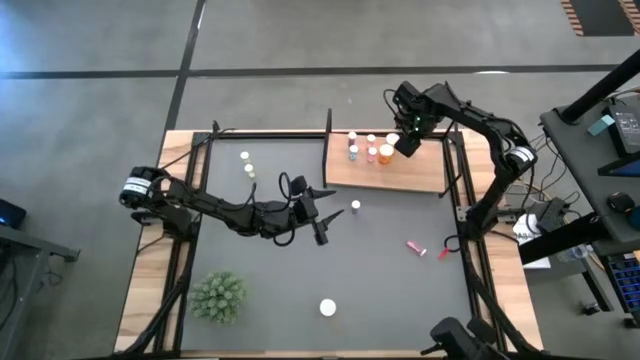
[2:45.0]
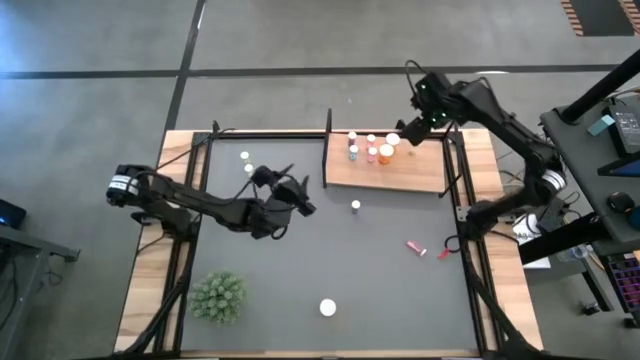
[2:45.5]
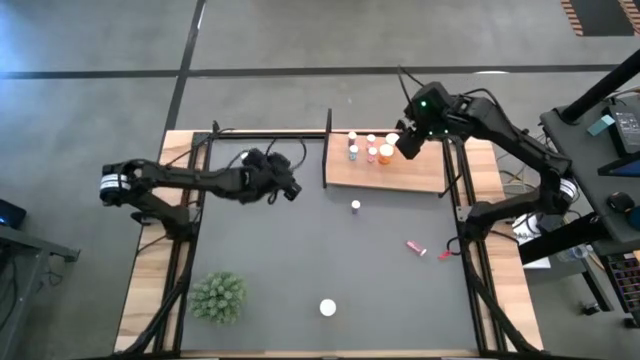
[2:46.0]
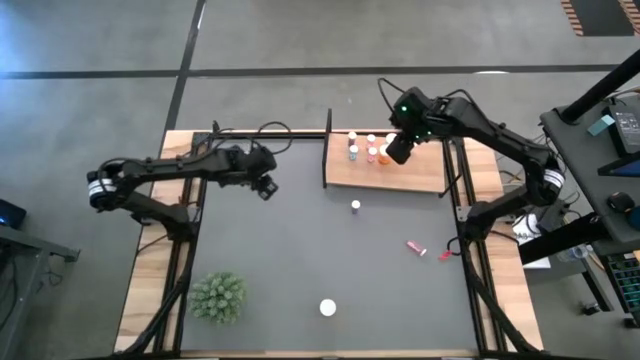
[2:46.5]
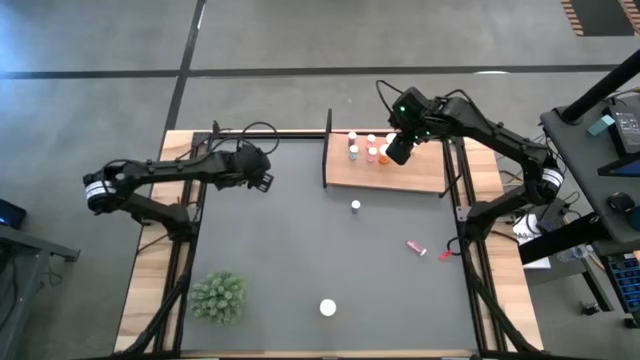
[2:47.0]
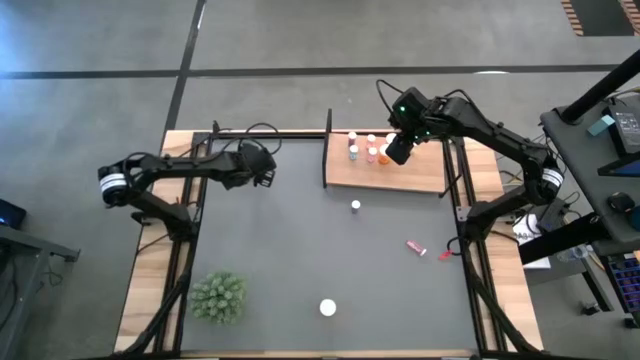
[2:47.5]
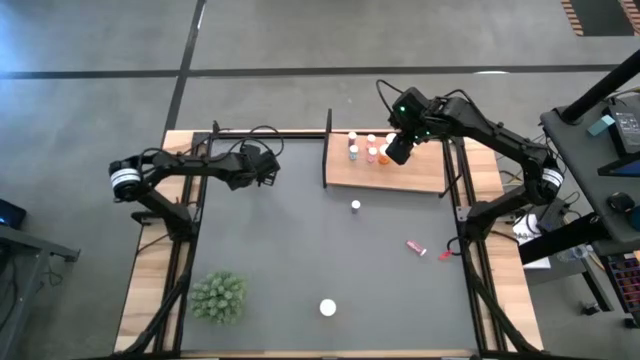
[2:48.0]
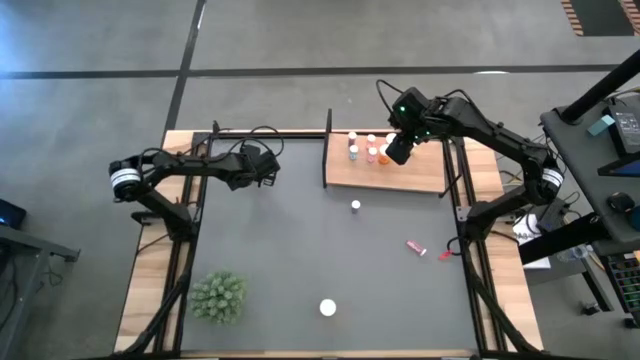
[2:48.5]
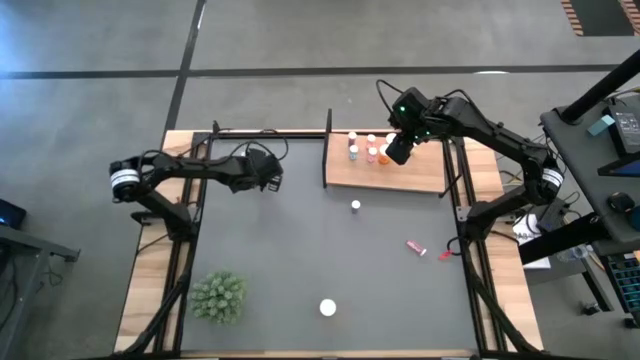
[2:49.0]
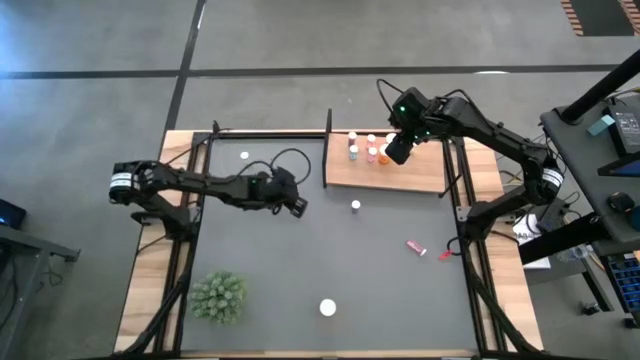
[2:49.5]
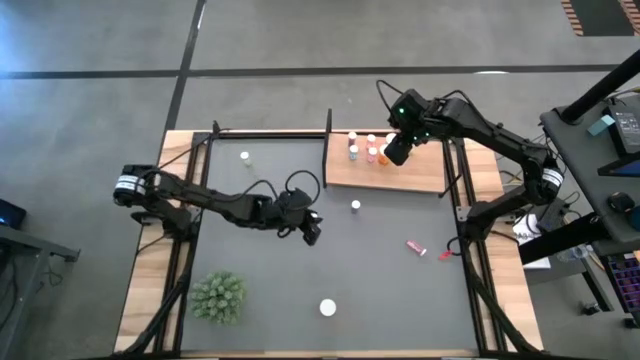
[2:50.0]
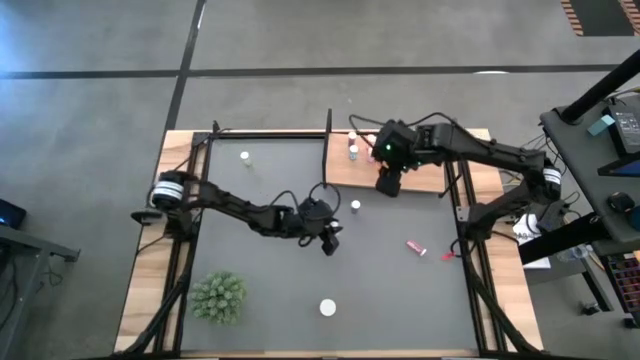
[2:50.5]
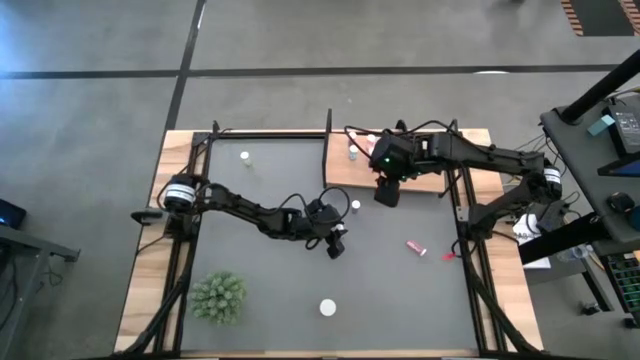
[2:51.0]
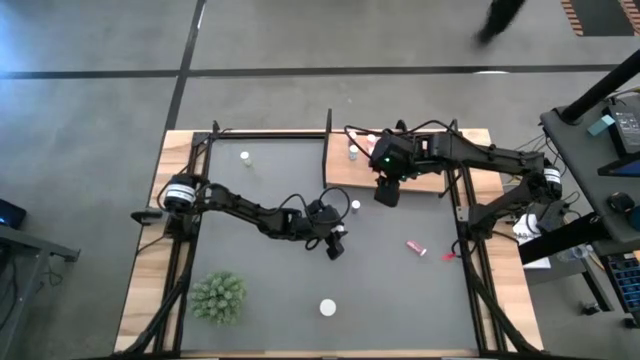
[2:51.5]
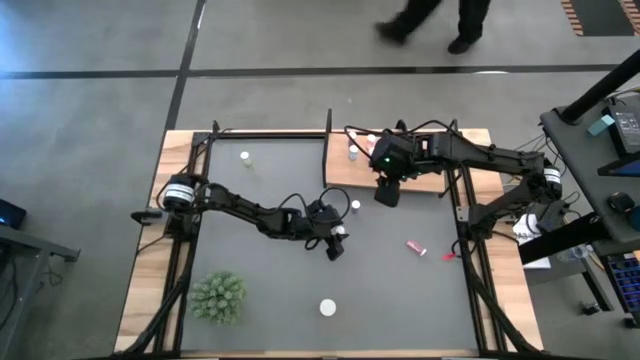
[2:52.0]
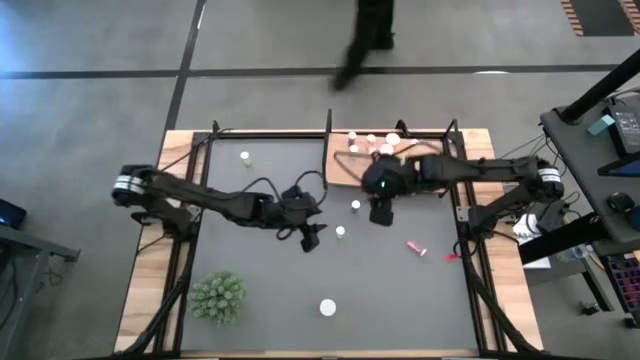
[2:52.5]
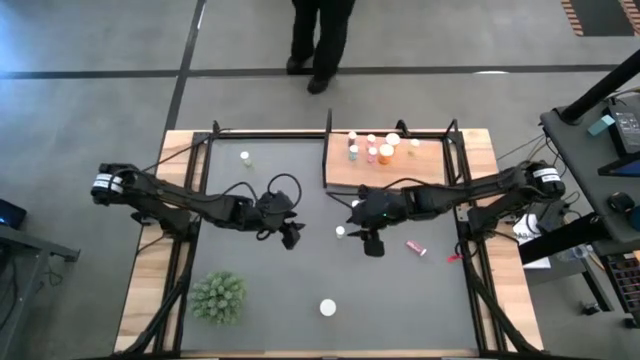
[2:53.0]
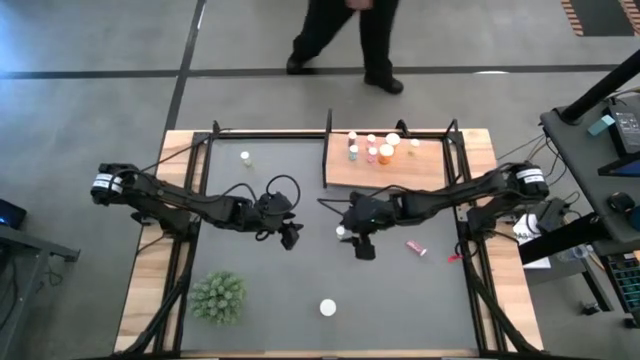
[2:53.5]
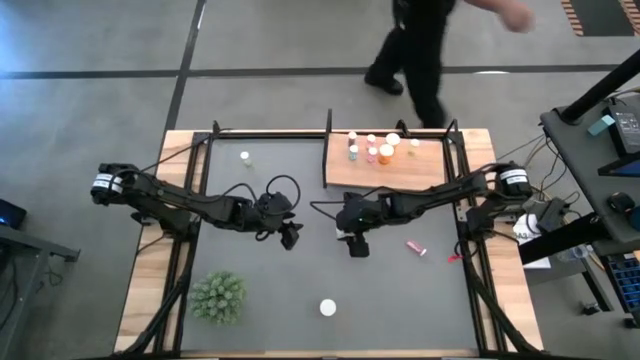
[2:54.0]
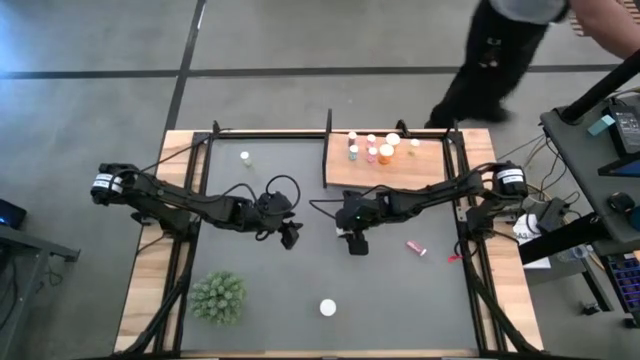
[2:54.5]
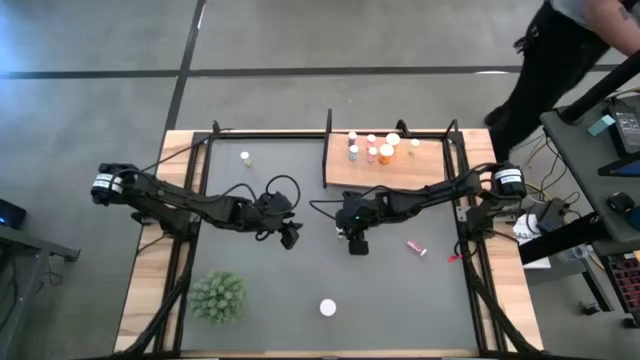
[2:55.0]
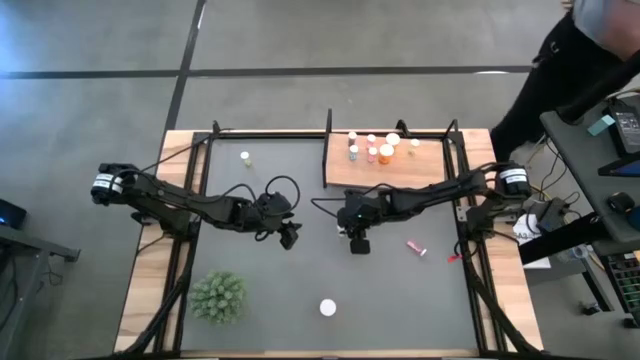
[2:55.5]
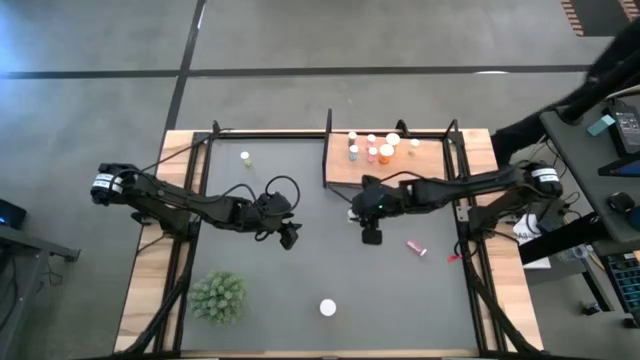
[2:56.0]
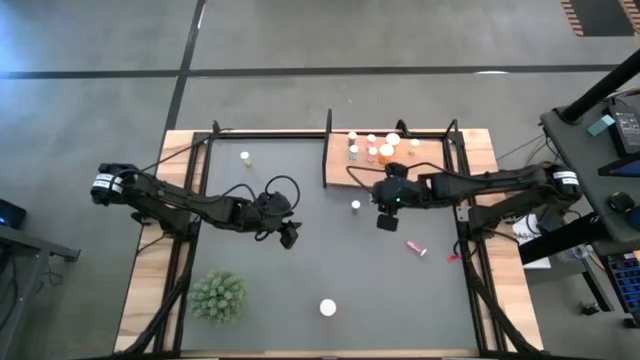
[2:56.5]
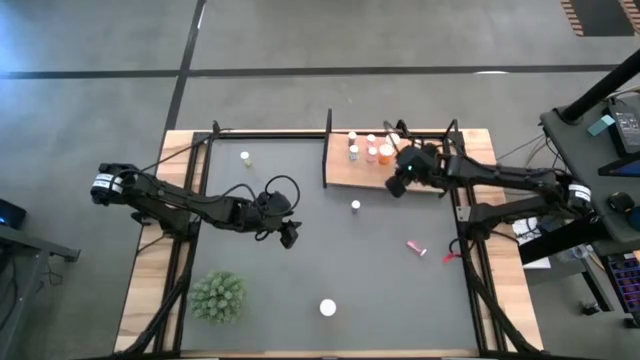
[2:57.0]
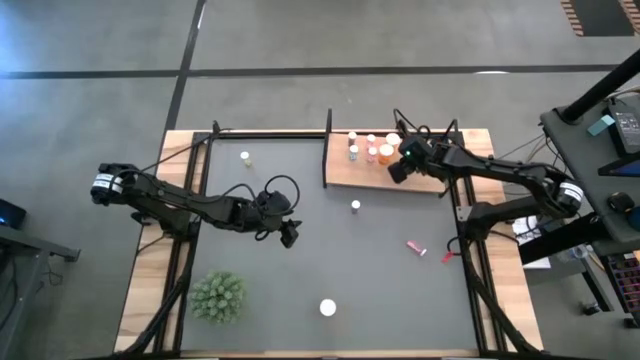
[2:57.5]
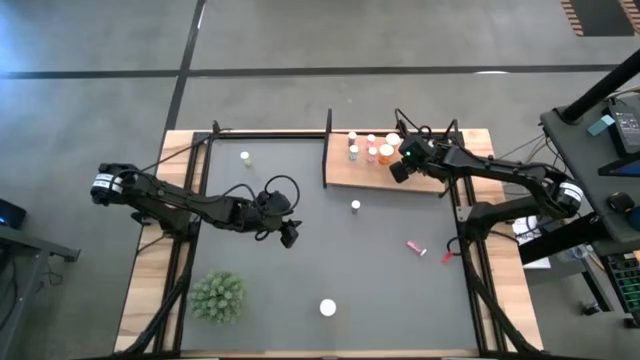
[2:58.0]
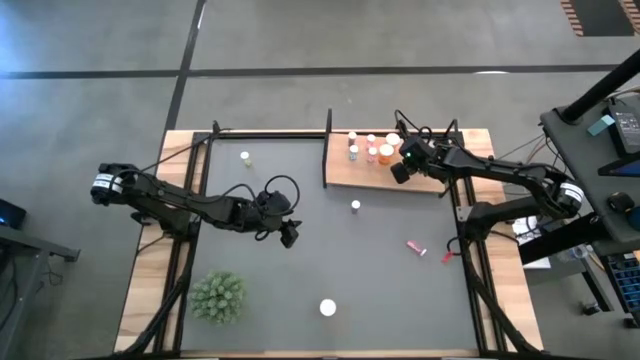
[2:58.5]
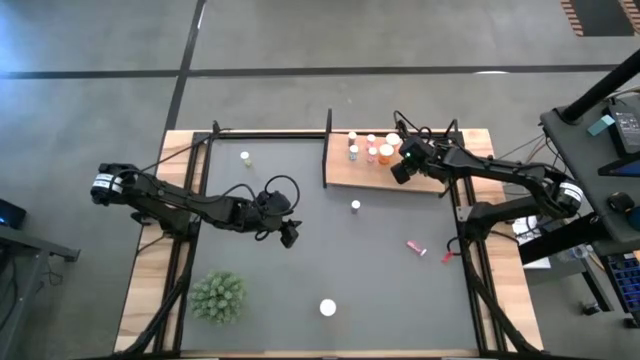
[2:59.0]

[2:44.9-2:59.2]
Task: Pick and place medicine bottles onto shelf by color
Put the bottom yellow pill bottle on the shelf aligned with the other yellow pill bottle

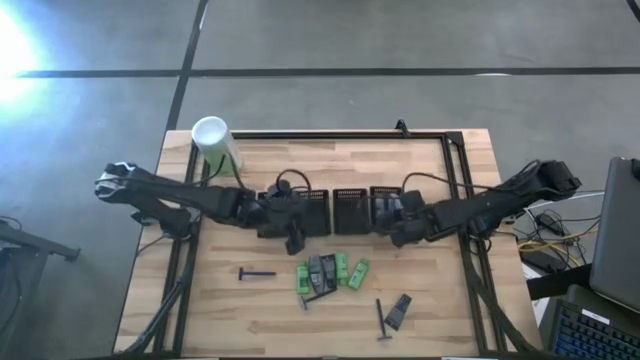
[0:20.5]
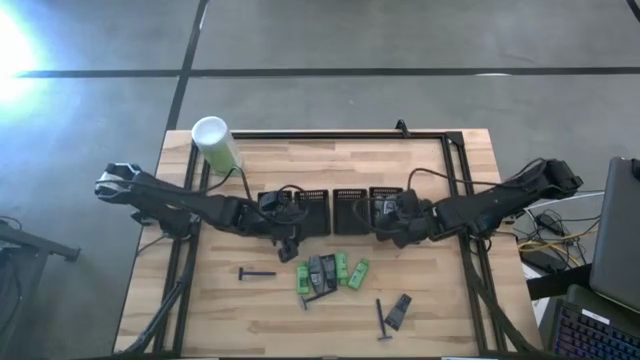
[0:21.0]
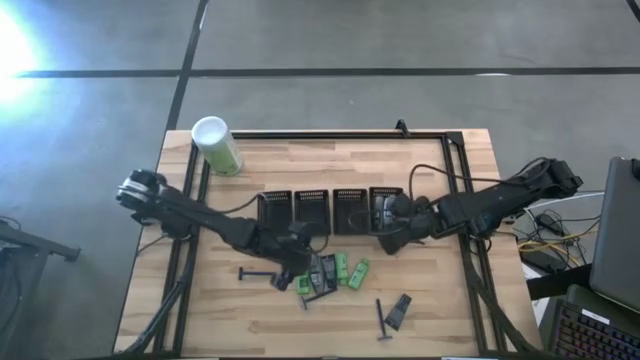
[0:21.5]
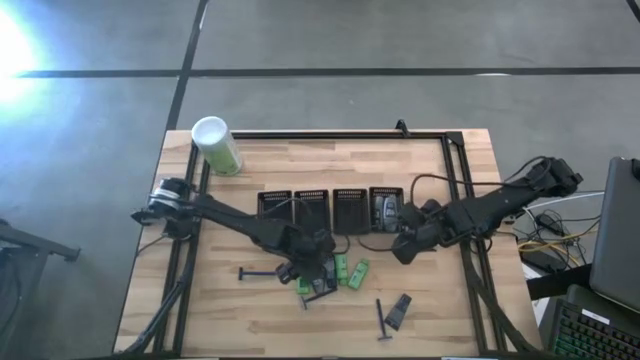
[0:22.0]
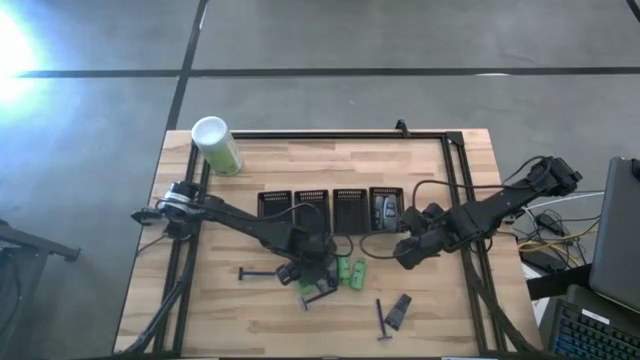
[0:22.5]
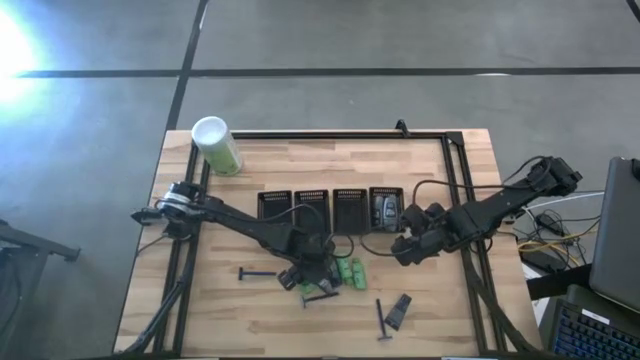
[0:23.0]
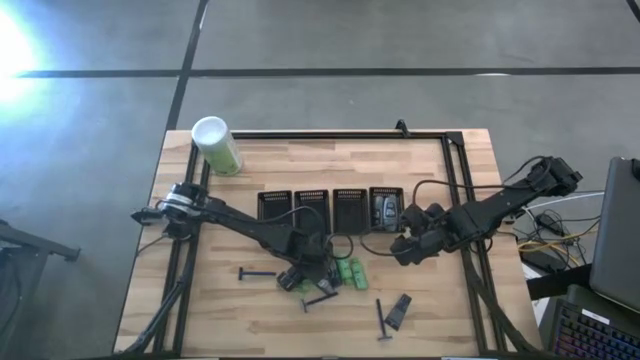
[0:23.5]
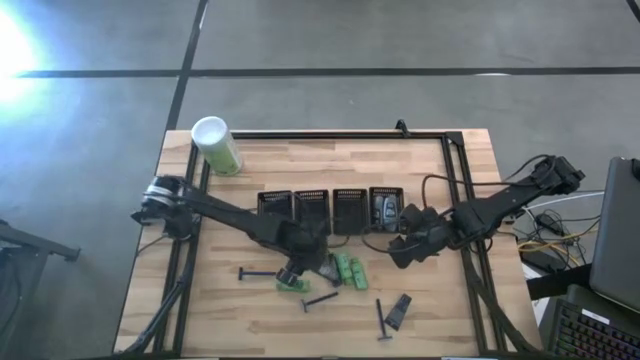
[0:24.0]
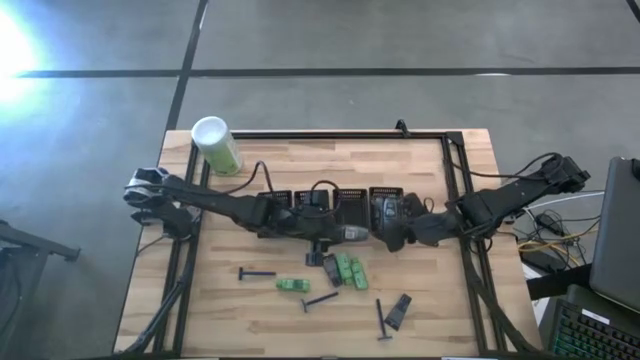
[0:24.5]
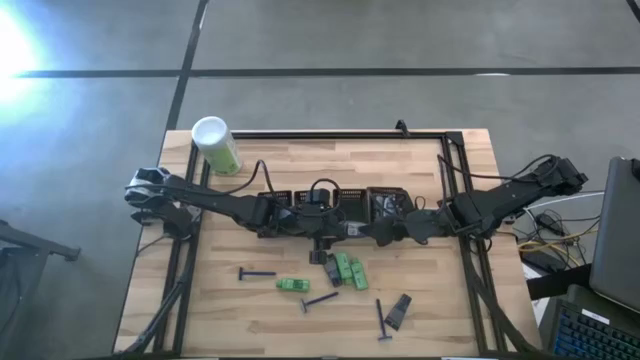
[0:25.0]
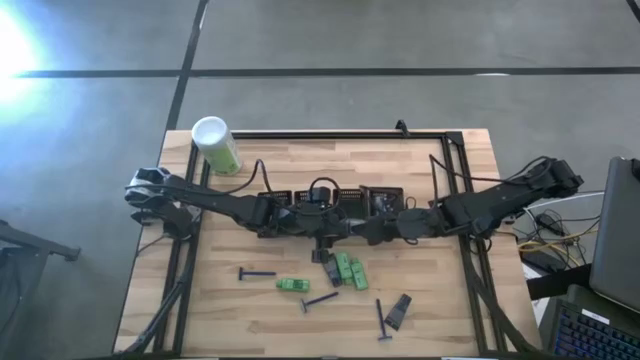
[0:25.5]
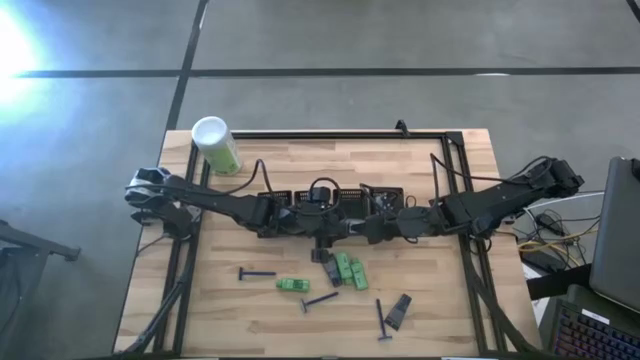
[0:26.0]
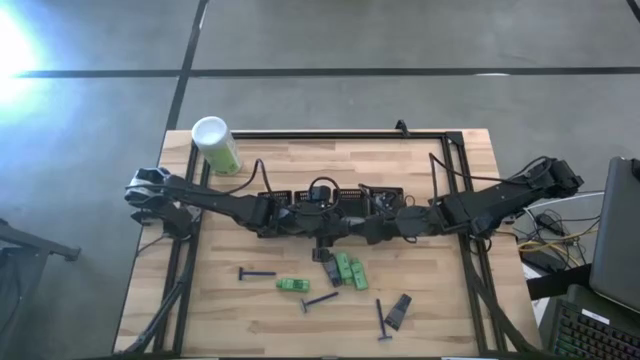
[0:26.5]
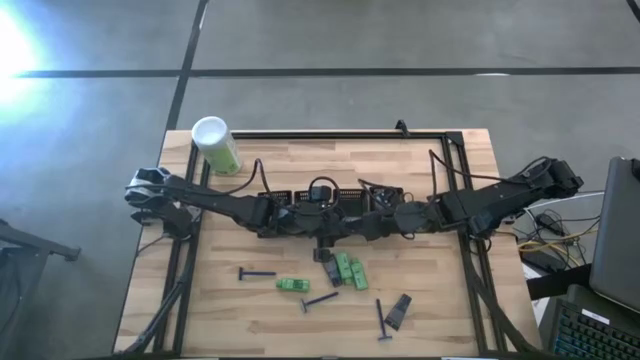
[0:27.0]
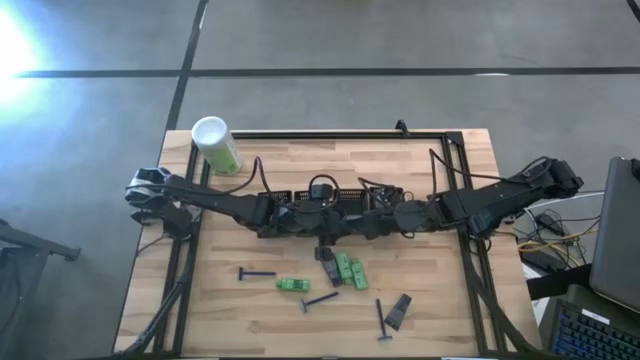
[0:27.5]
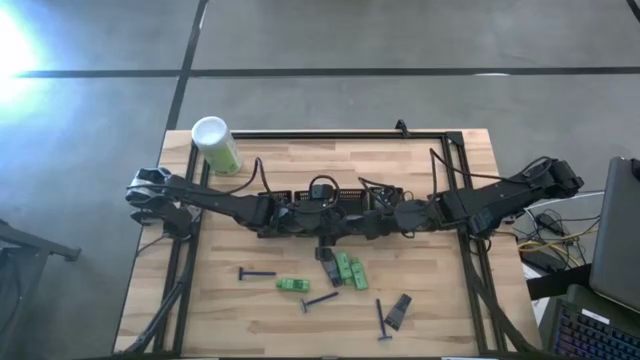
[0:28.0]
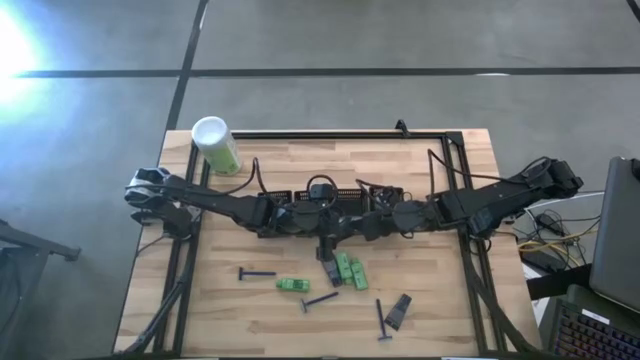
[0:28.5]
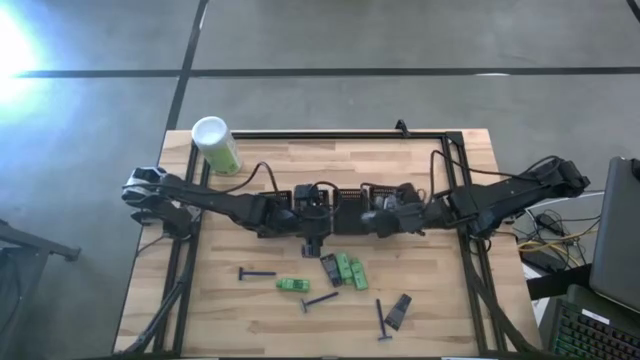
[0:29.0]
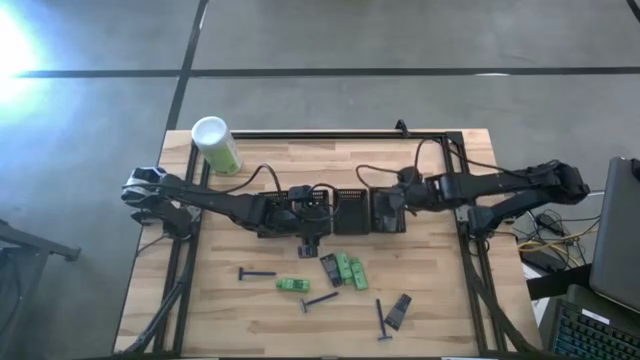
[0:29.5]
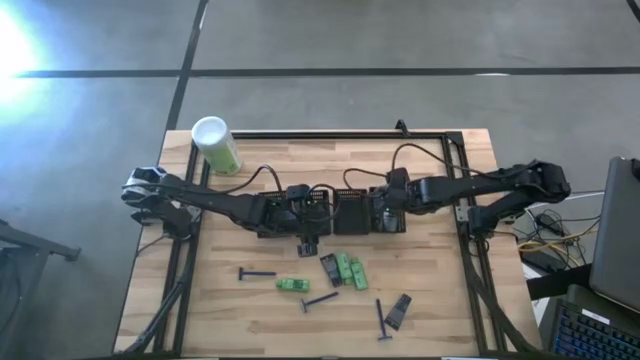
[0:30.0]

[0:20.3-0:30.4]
Task: Pick & Place Travel size toiletries
Put the gray deodorant into the right black basket
